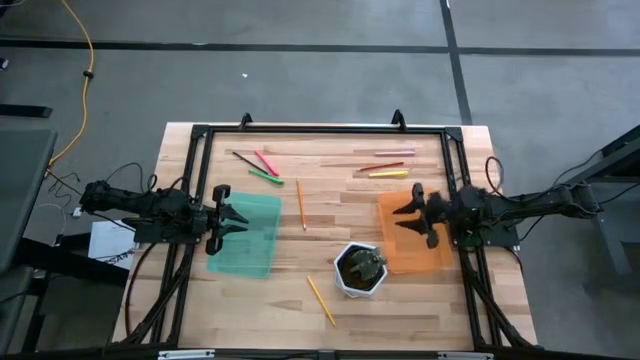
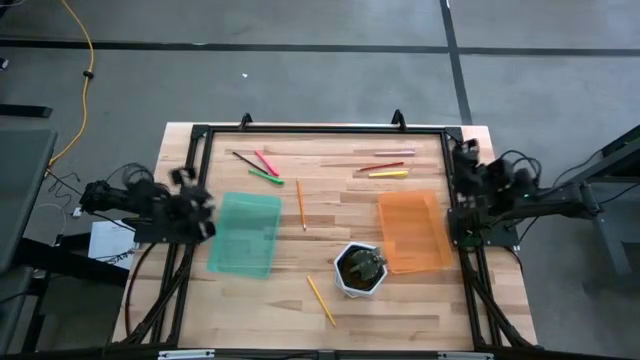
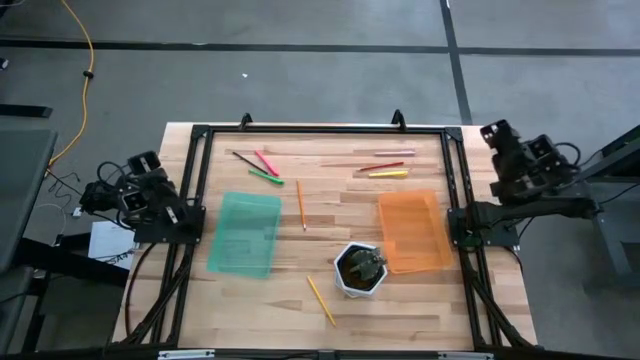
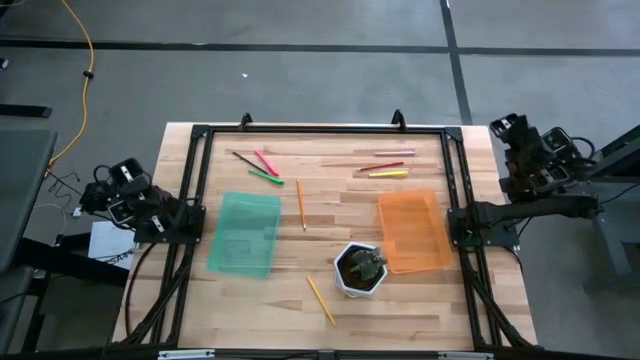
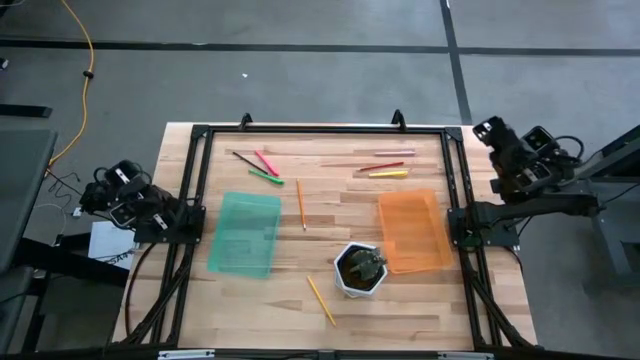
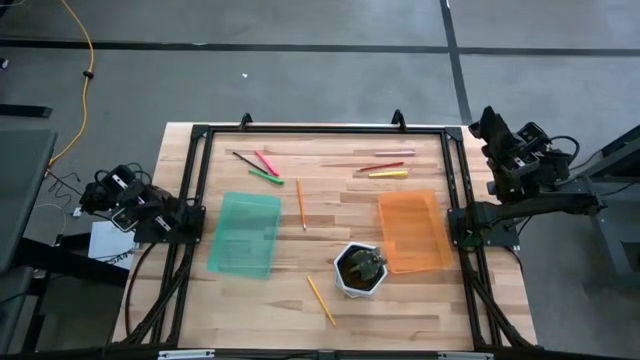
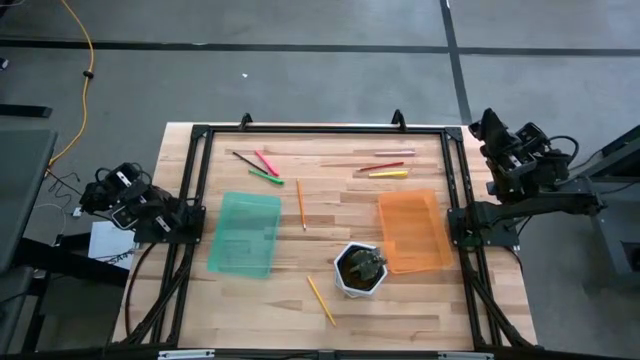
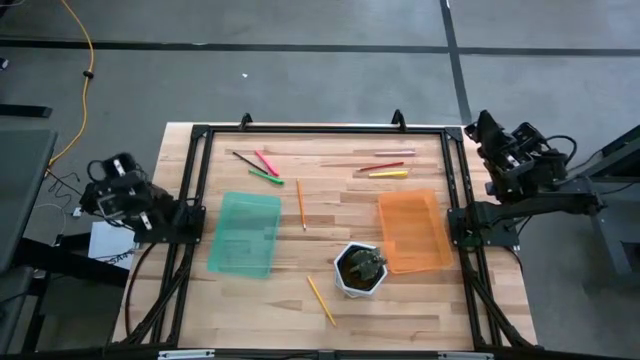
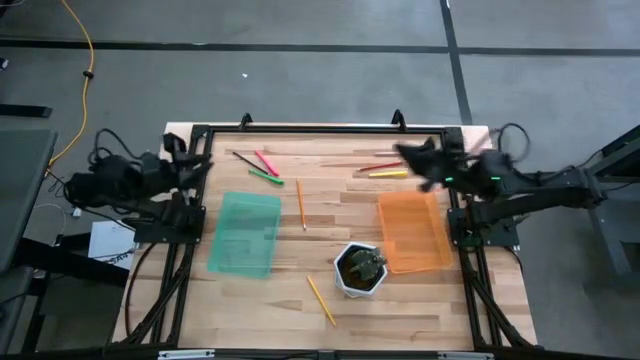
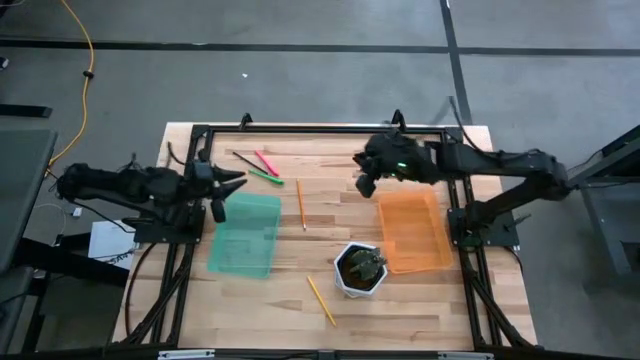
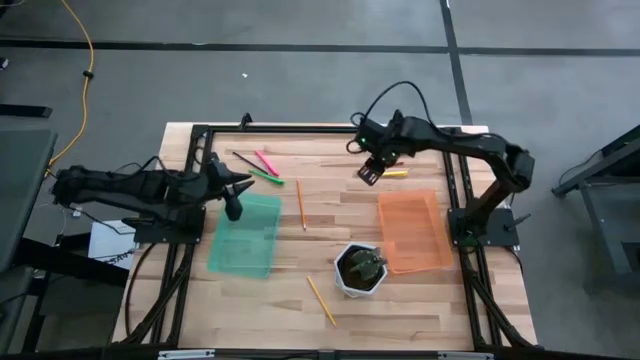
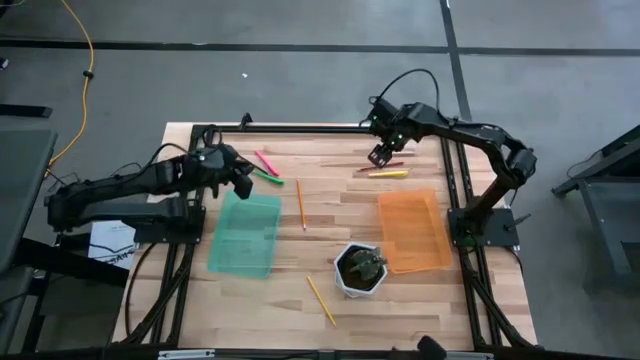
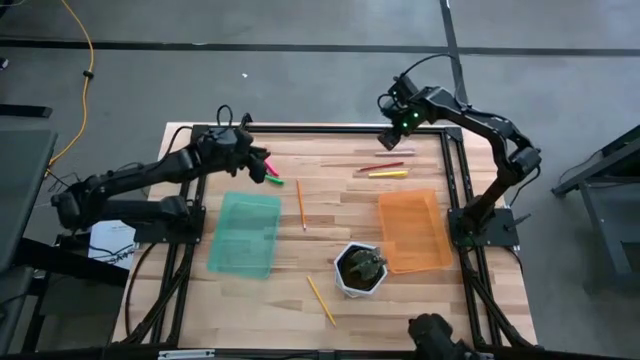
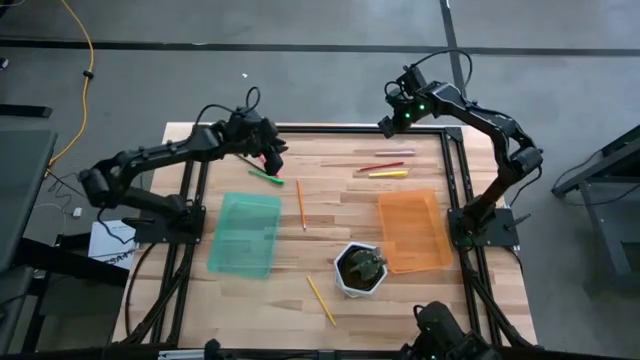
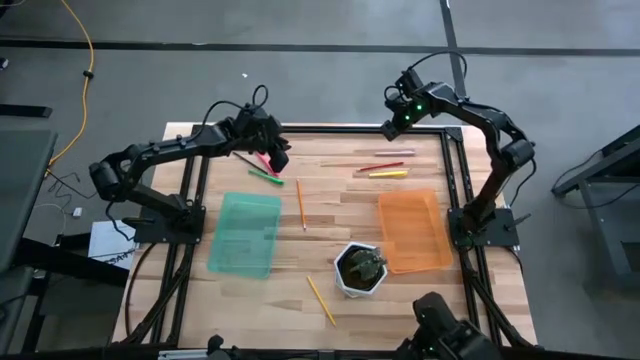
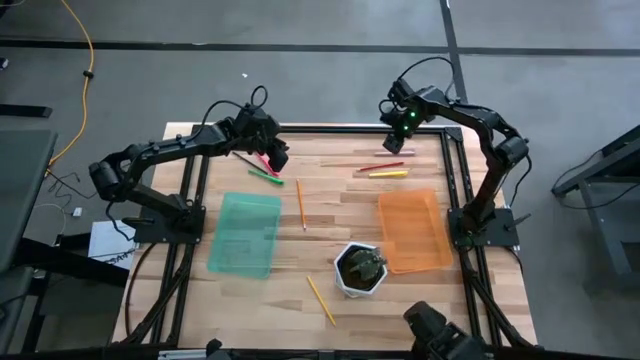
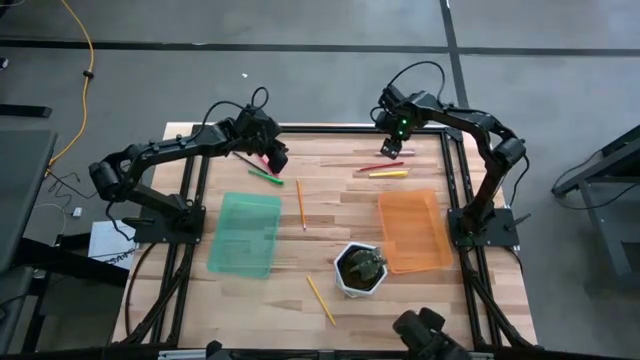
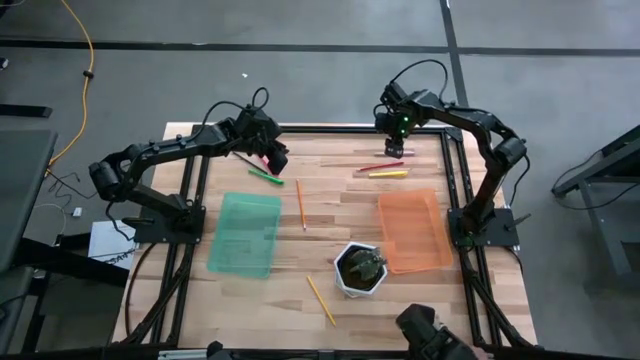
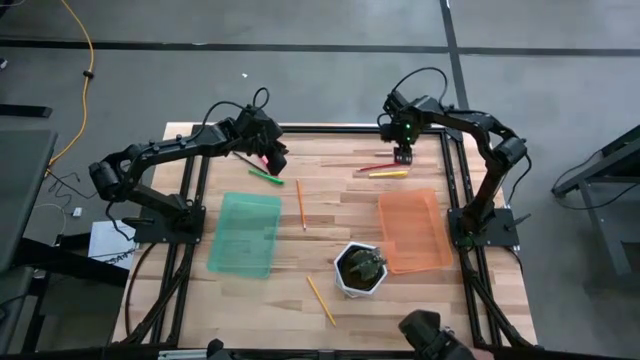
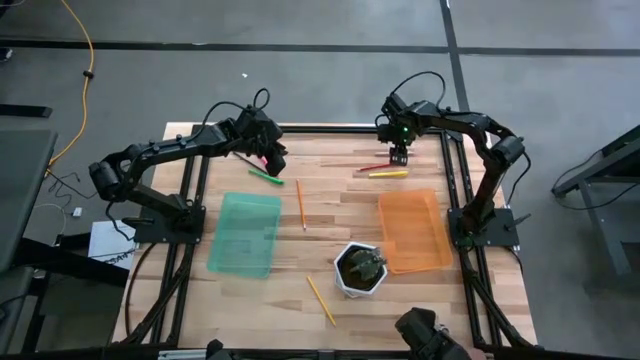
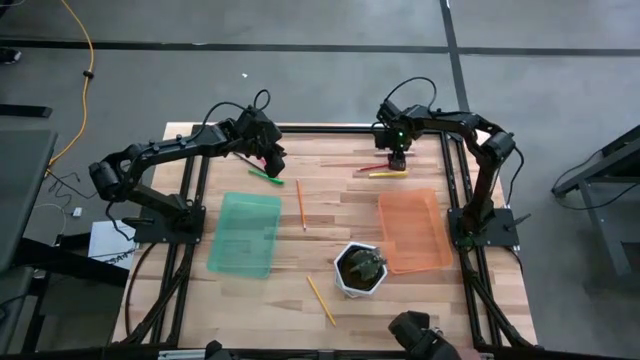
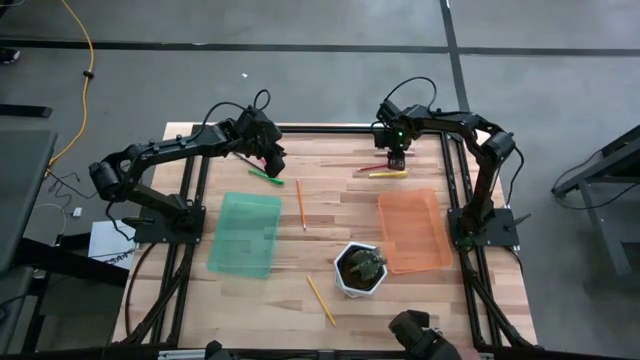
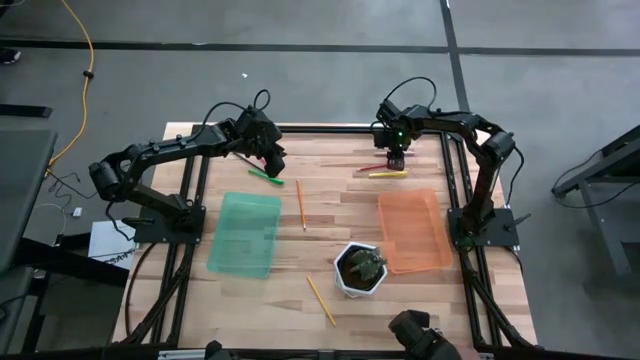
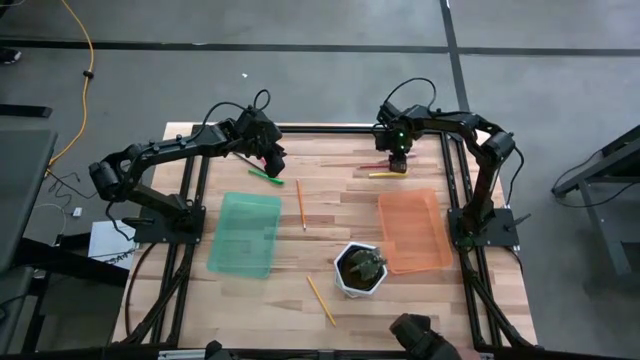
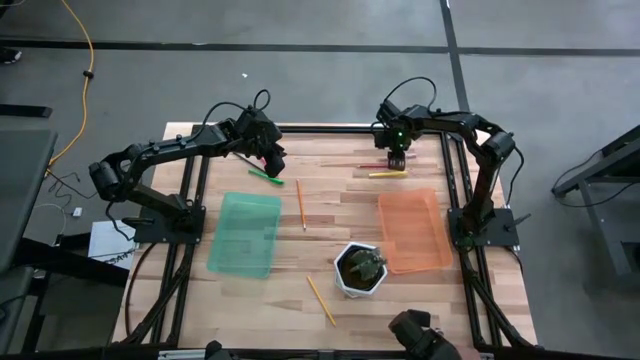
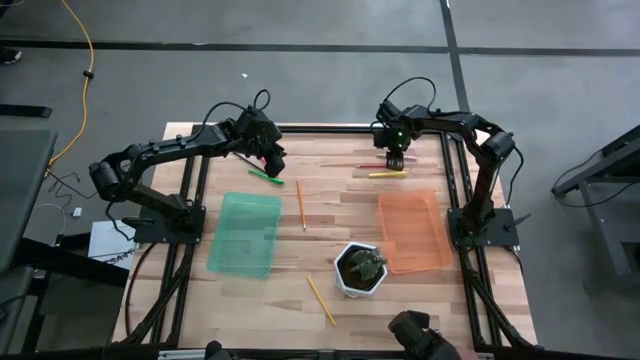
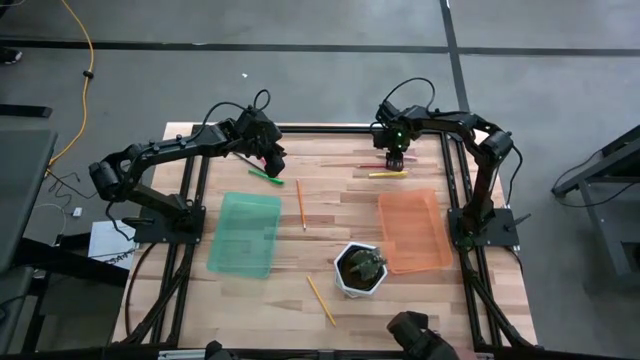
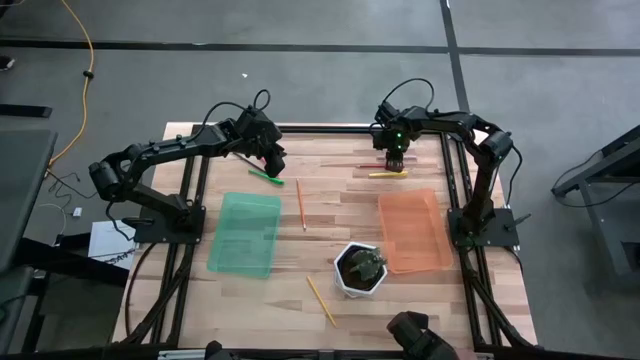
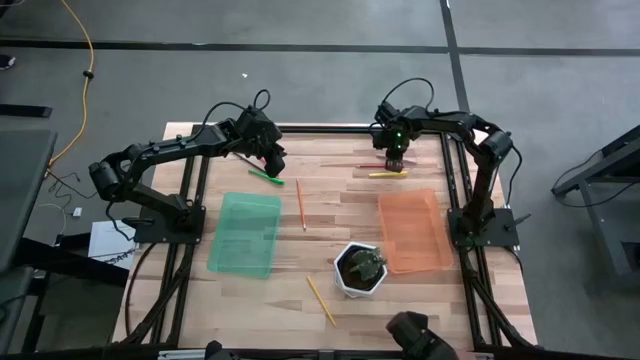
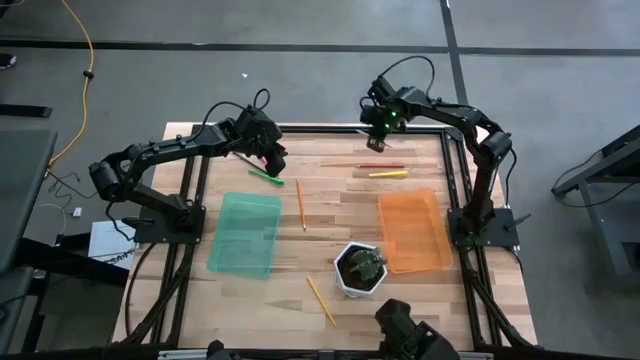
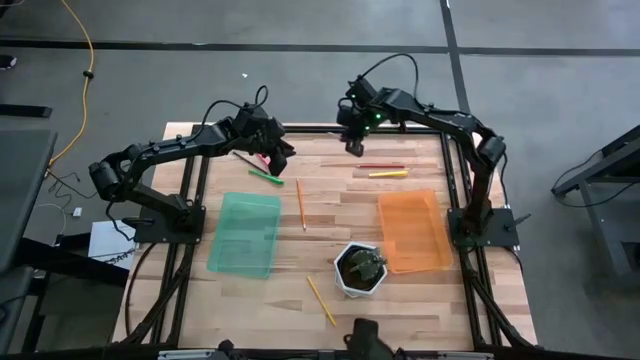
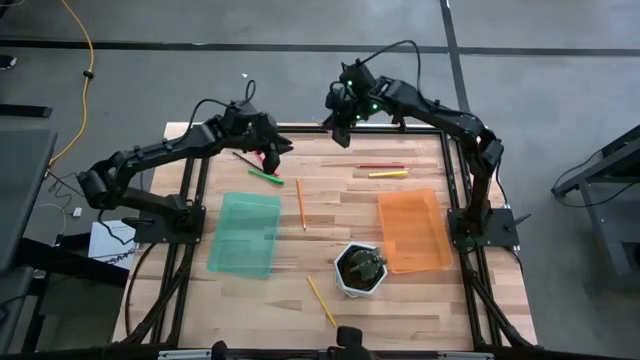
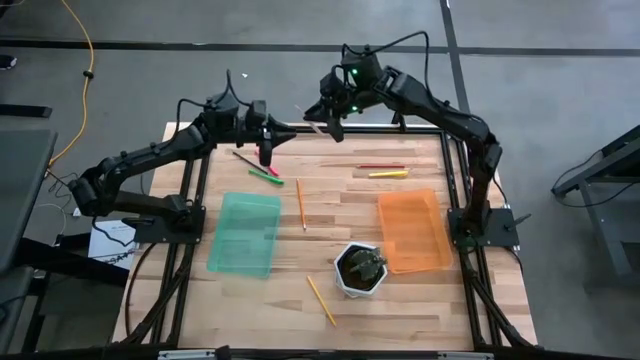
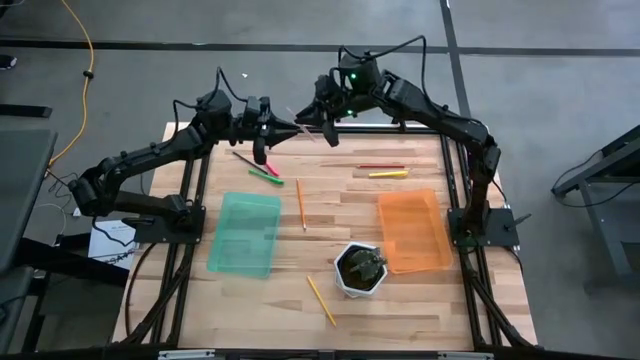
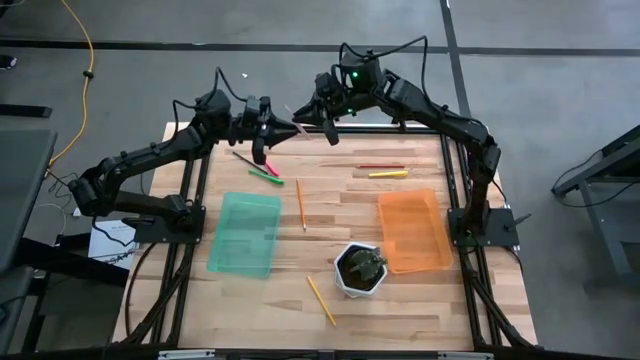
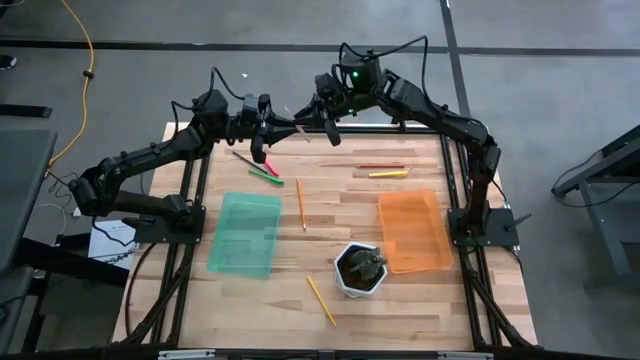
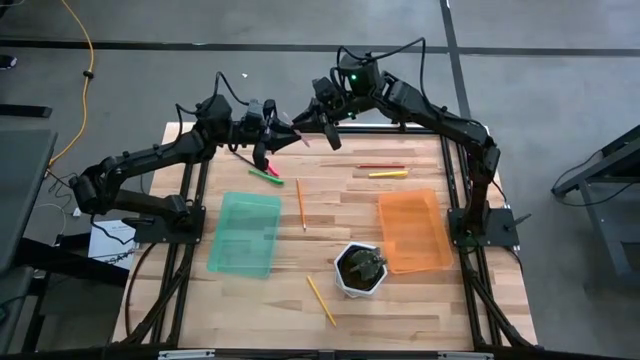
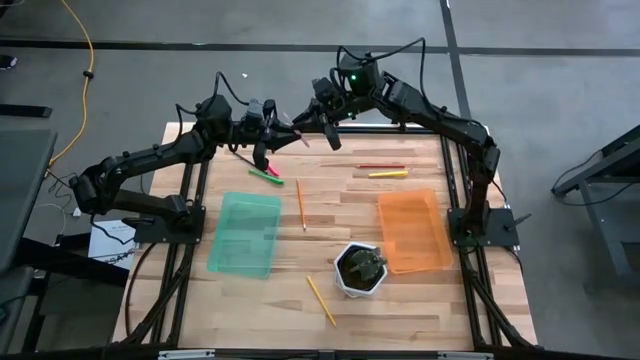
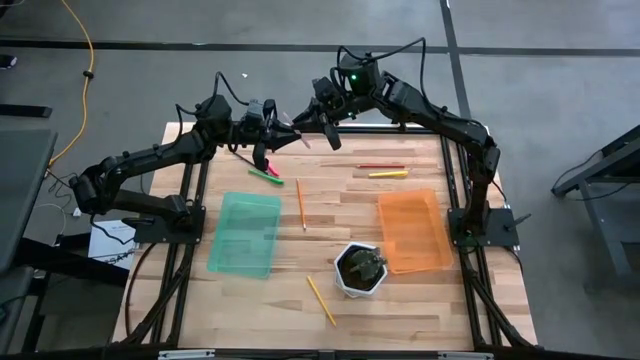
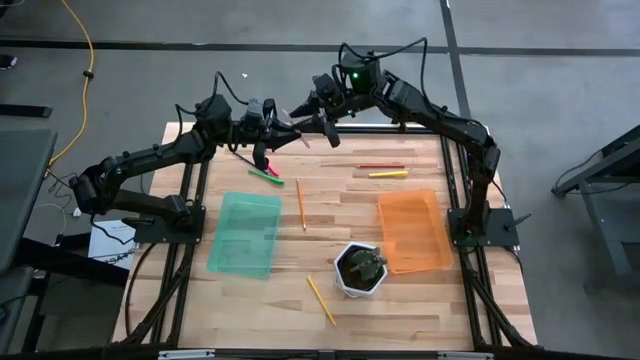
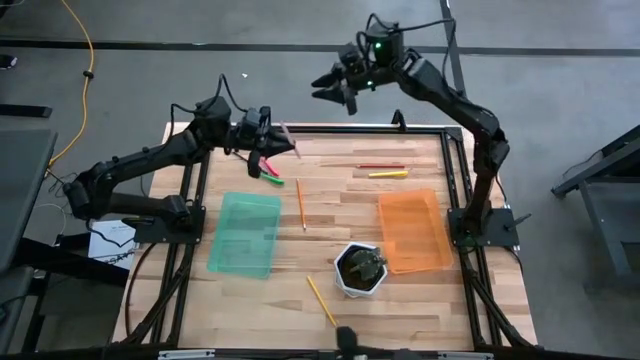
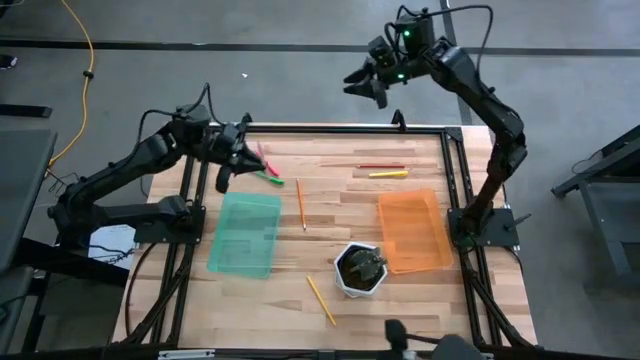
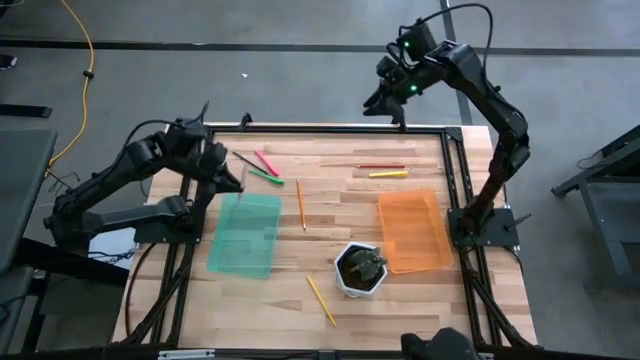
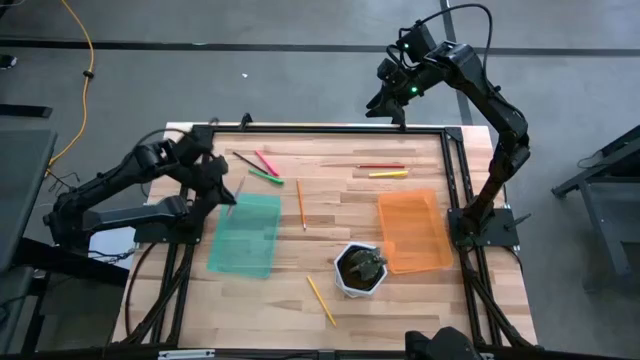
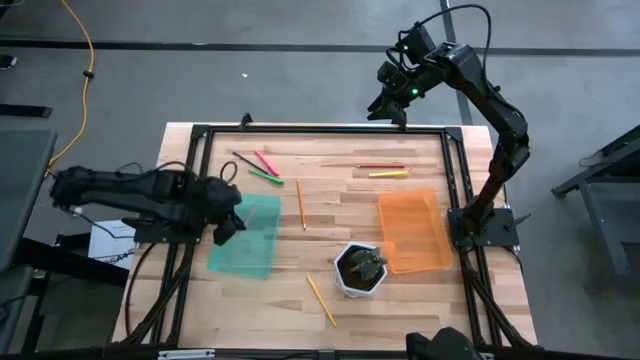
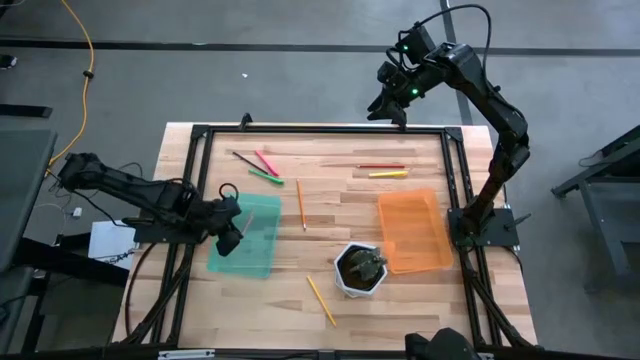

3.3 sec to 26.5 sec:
Task: Sort pens & pencils
Put the light pink pen into the green bin
